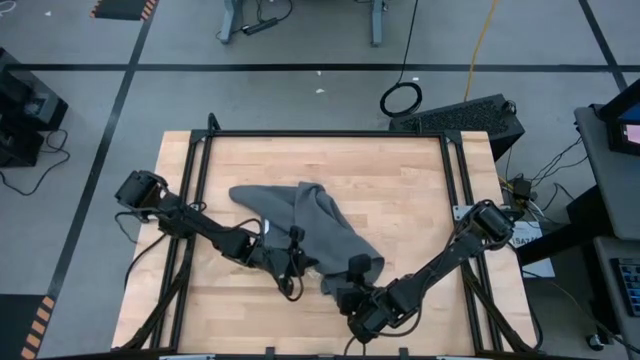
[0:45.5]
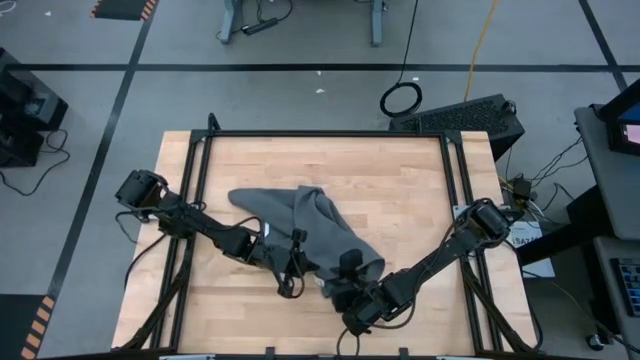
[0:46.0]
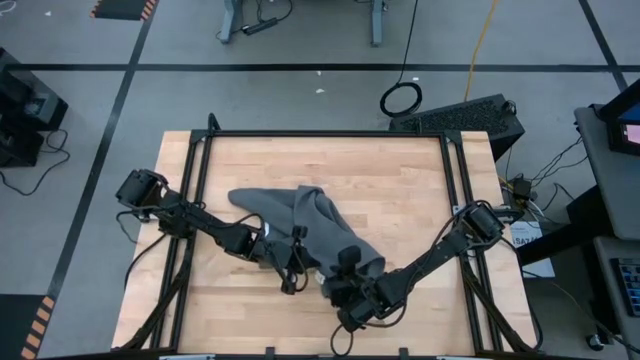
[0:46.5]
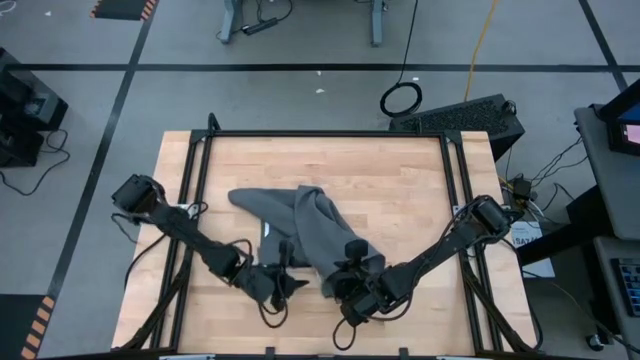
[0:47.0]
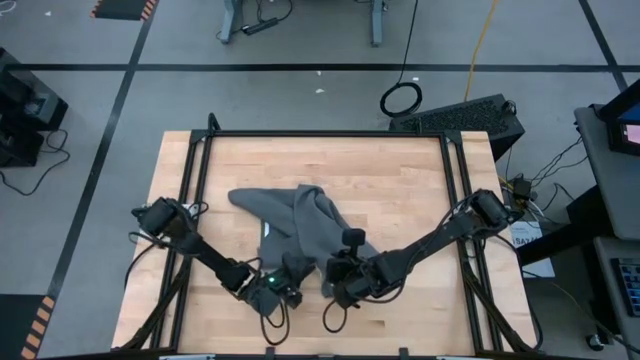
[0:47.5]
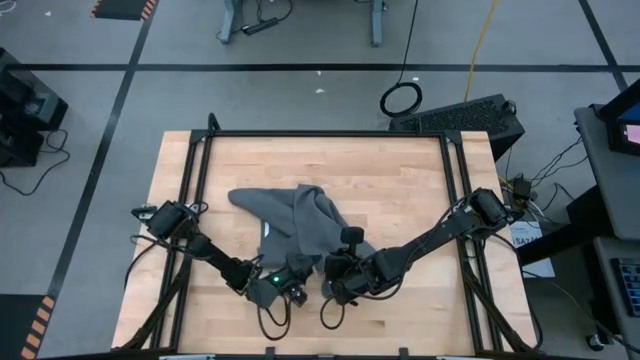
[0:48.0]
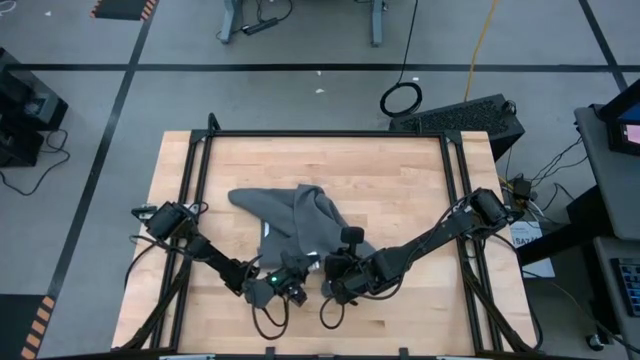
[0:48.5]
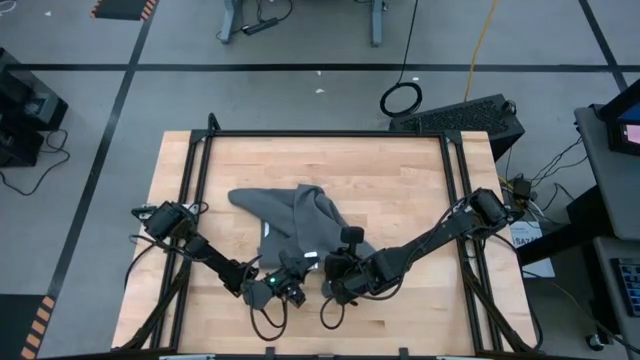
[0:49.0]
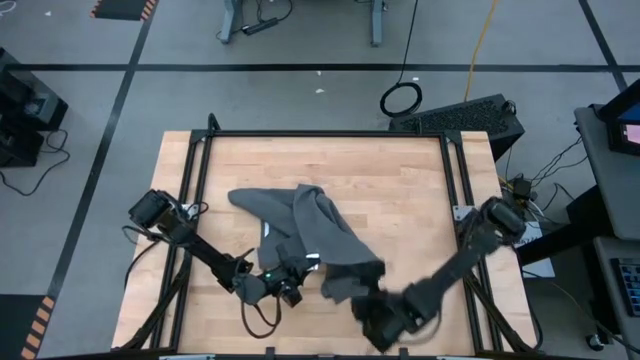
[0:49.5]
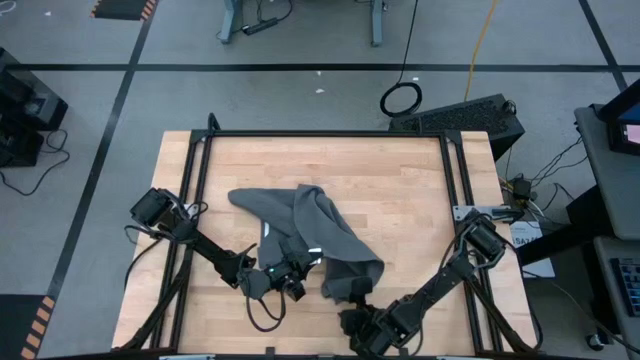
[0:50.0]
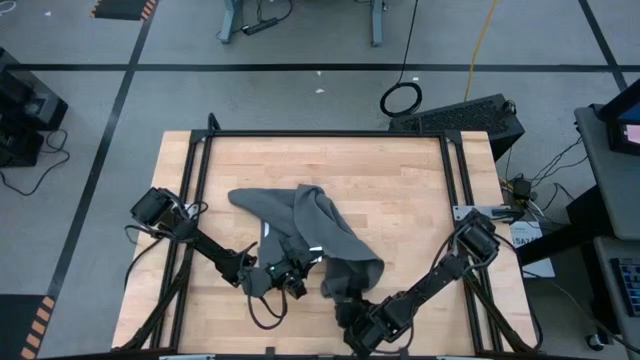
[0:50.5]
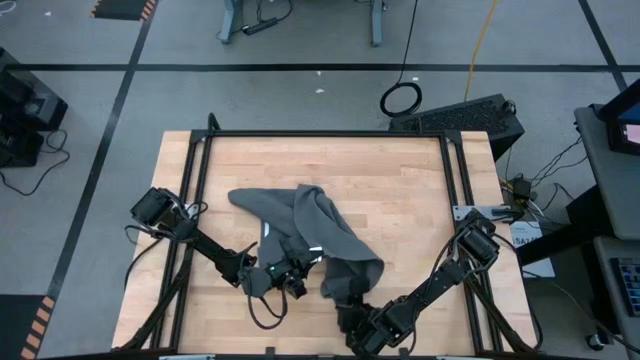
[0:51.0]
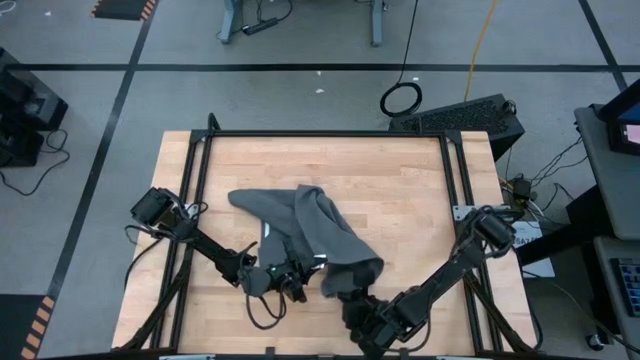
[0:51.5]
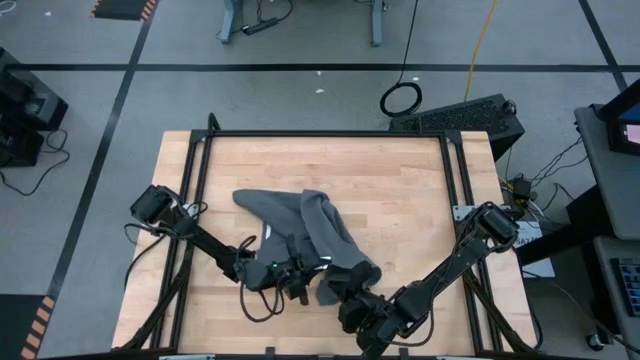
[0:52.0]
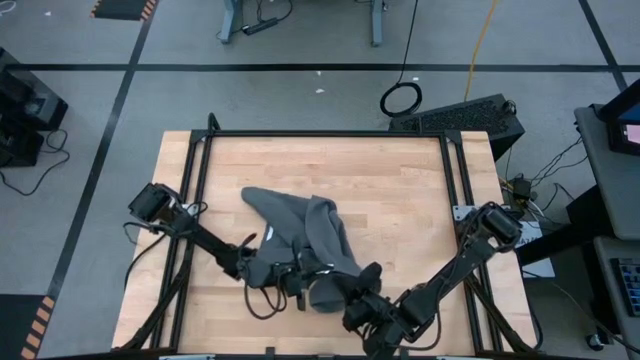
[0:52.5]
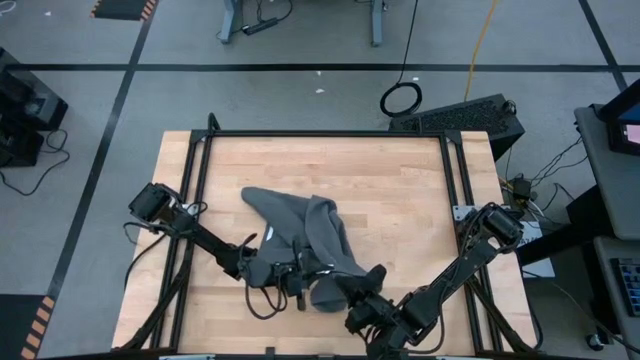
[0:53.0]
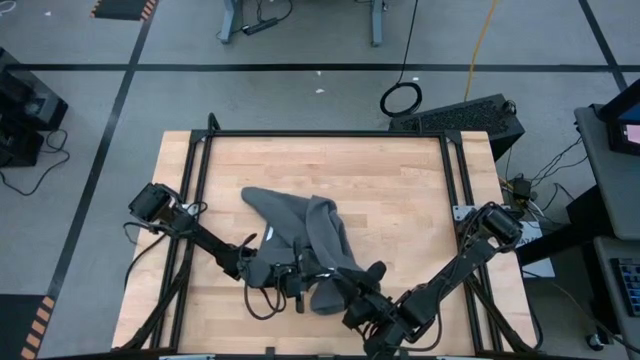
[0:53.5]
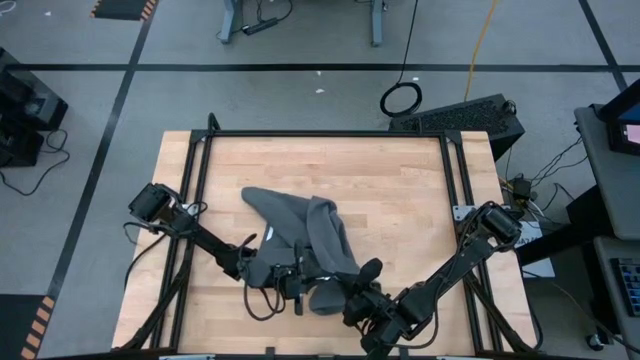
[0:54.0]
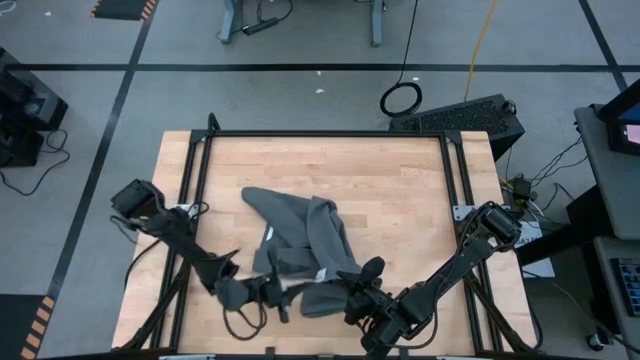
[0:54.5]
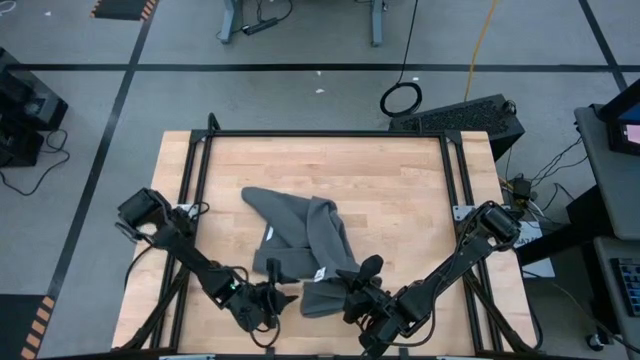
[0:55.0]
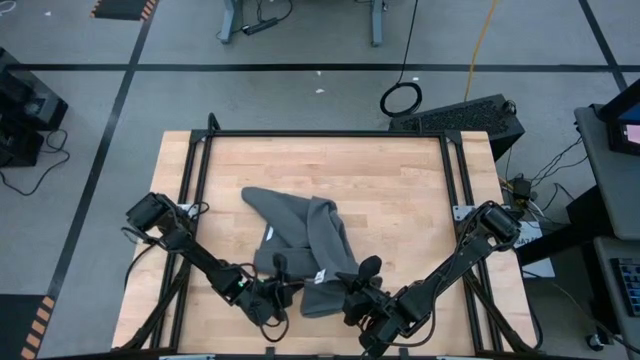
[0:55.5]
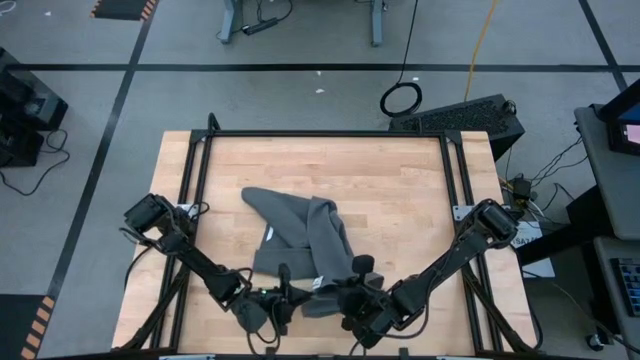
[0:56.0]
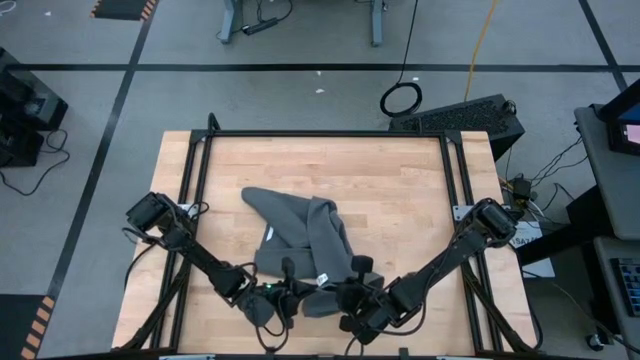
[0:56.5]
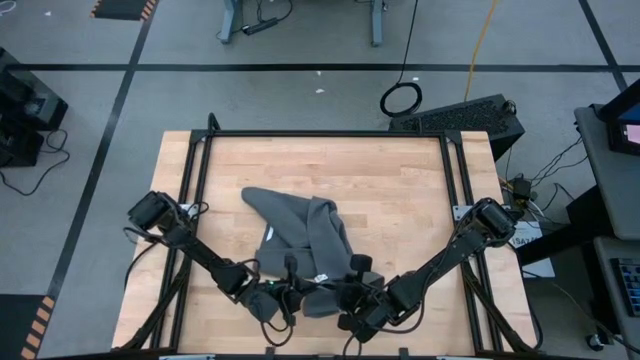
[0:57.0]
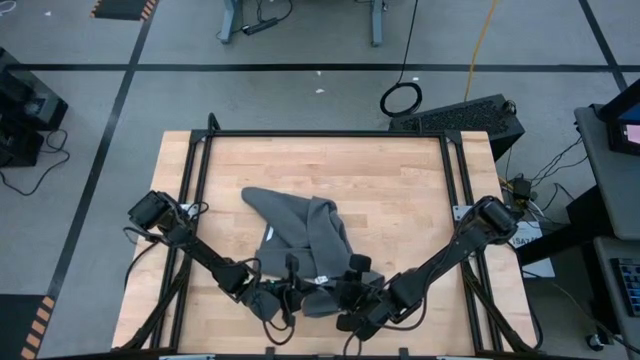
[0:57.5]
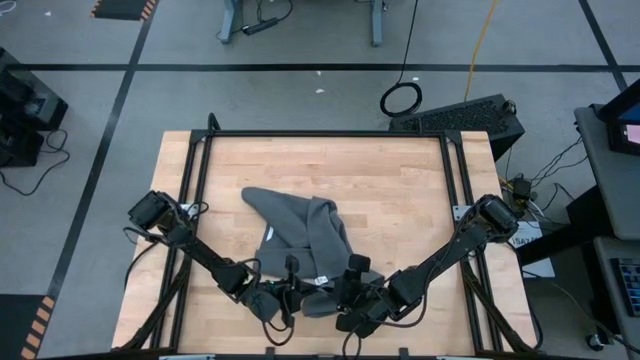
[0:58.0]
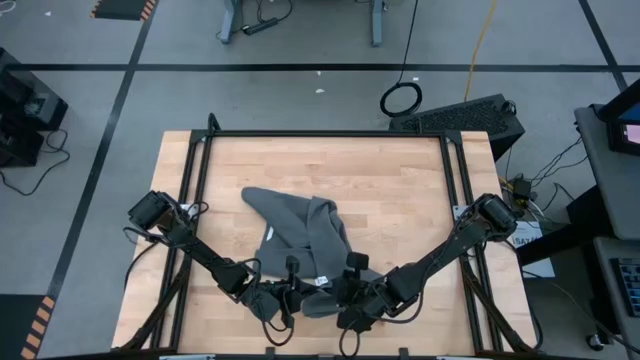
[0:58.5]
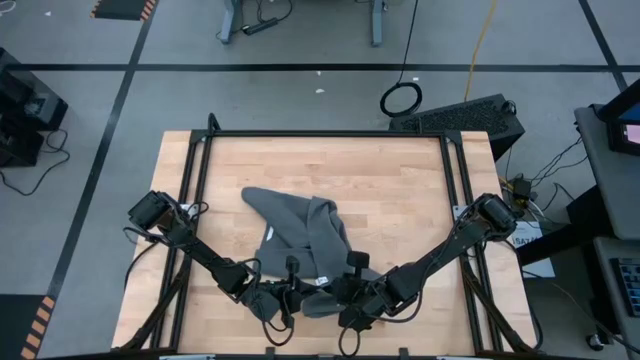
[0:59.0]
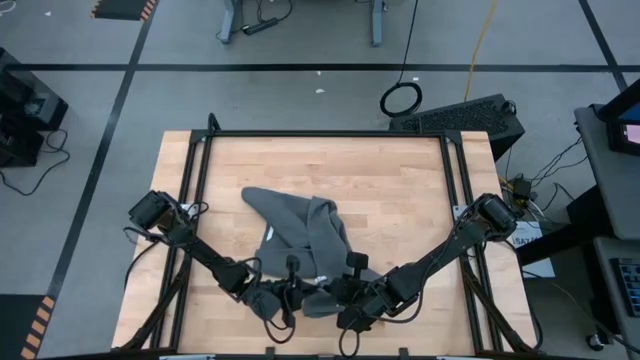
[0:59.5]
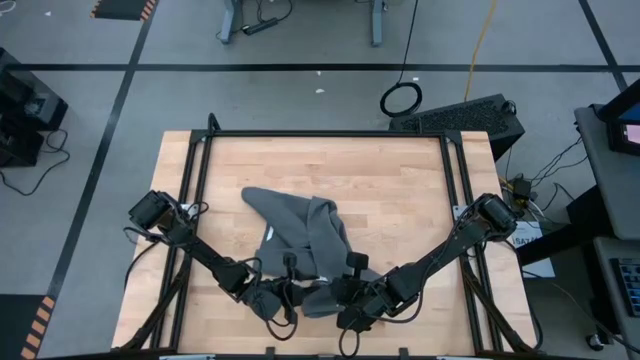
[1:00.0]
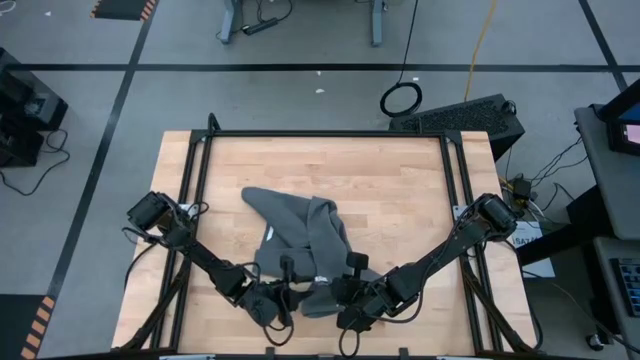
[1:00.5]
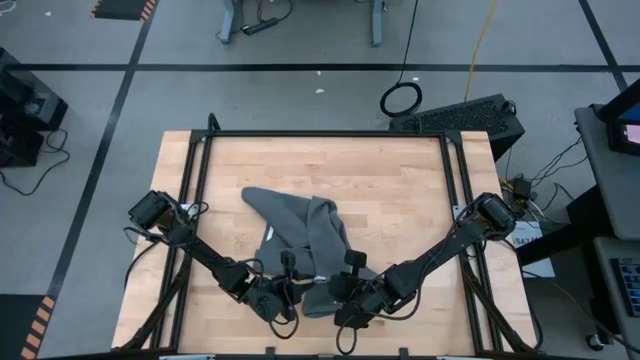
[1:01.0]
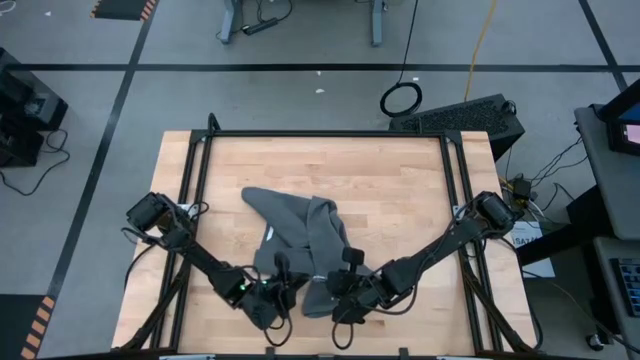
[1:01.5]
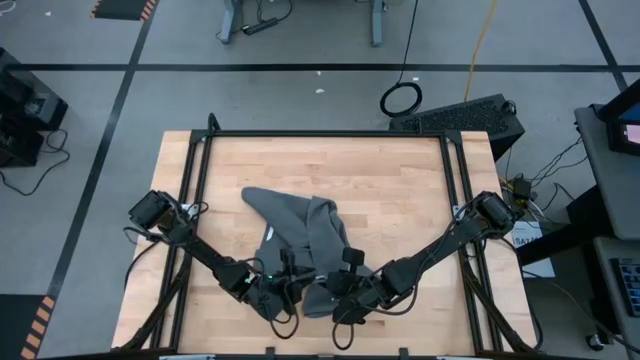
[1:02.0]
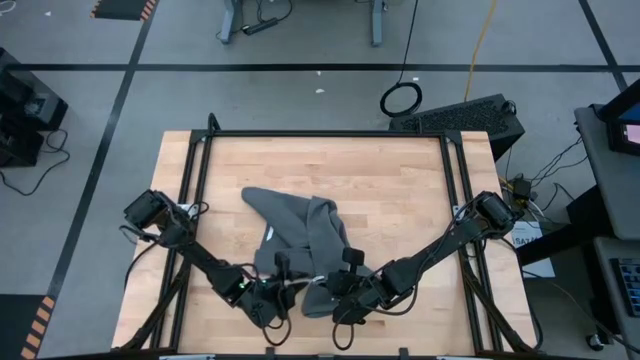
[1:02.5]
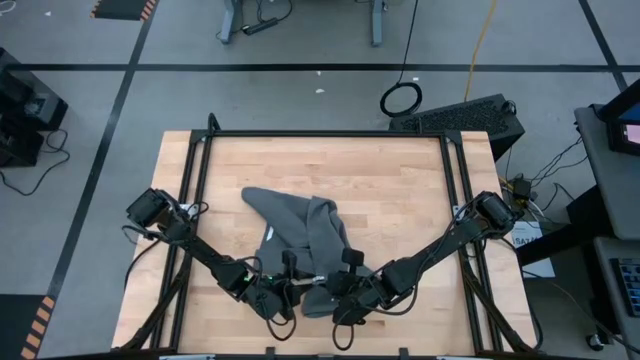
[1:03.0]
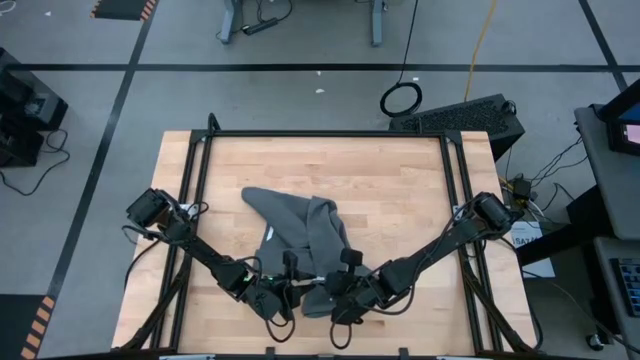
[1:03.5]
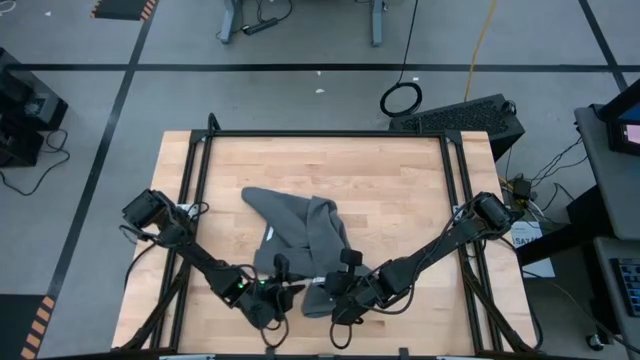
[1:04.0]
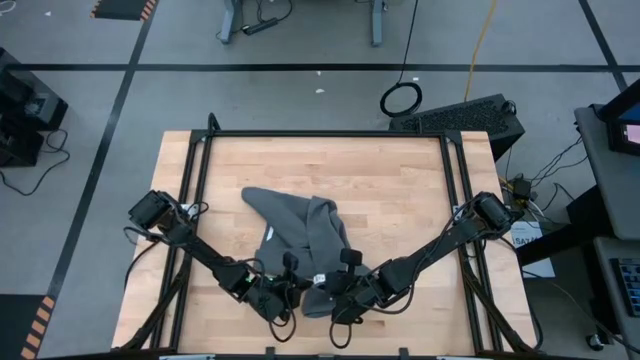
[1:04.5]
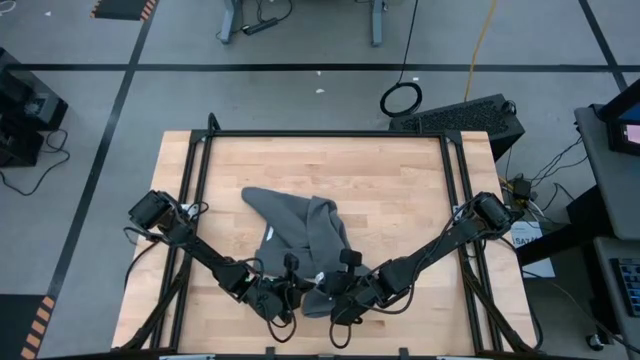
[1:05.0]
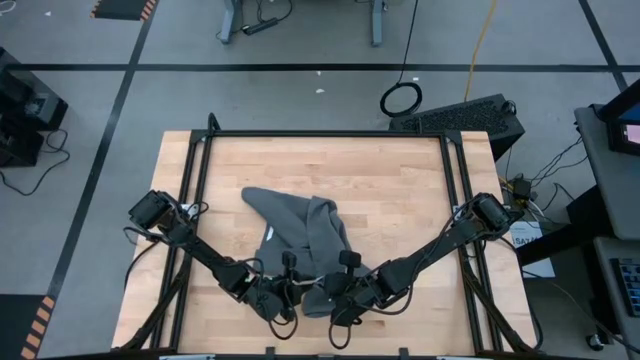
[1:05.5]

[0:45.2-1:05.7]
Task: Roll towel into tight, uniform cylinder
Roll the gray towel

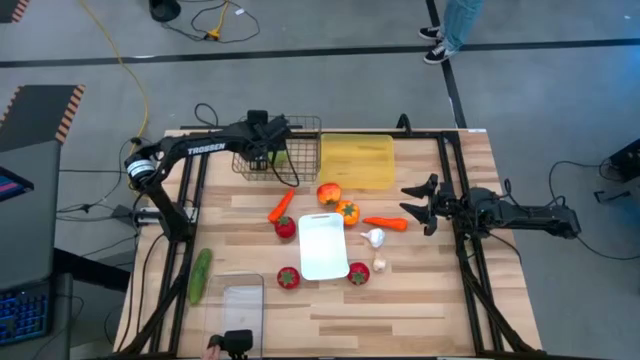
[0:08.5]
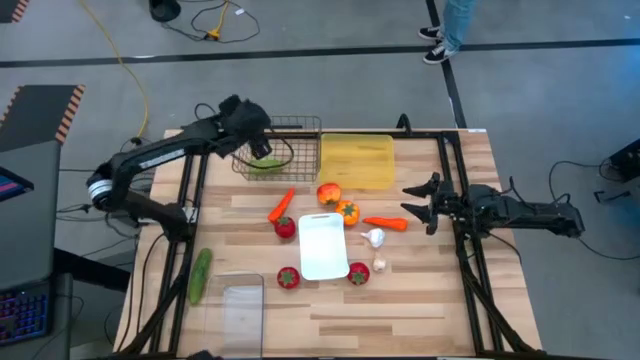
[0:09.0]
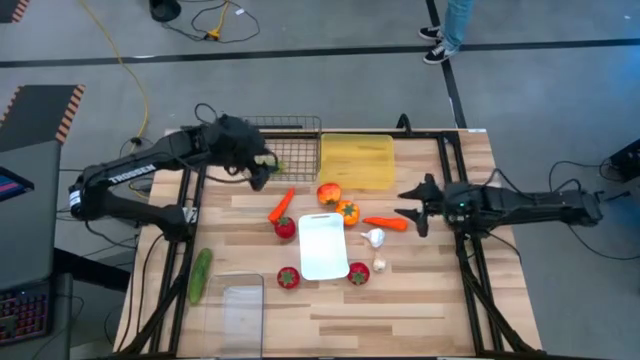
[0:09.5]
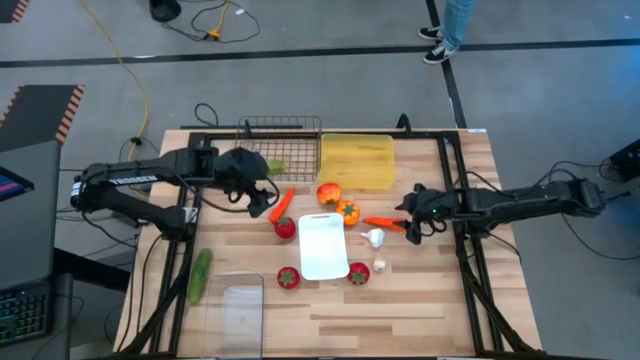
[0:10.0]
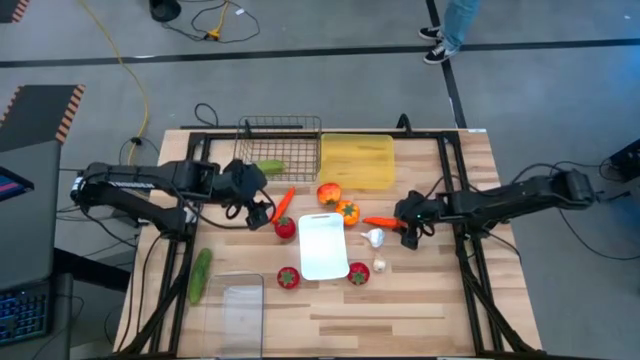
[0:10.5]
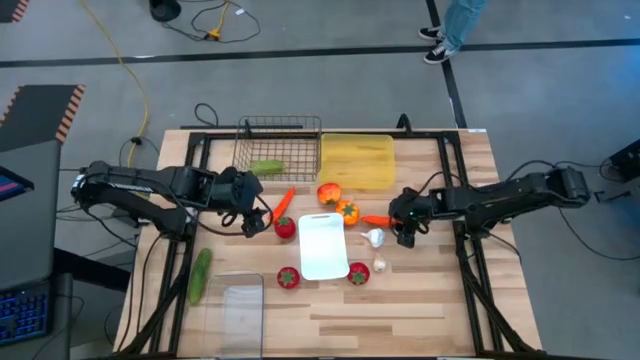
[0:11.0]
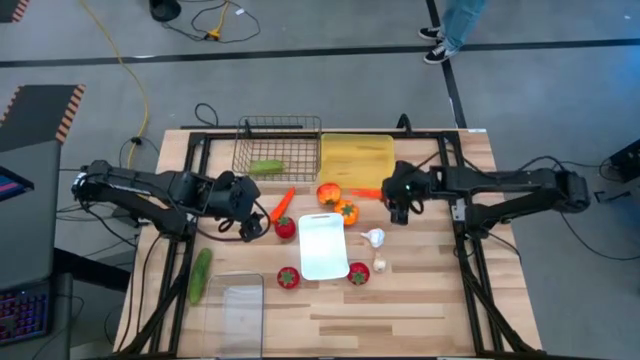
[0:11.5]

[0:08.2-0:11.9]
Task: Sort produce into baskets
Put the right carrot into the yellow bin
